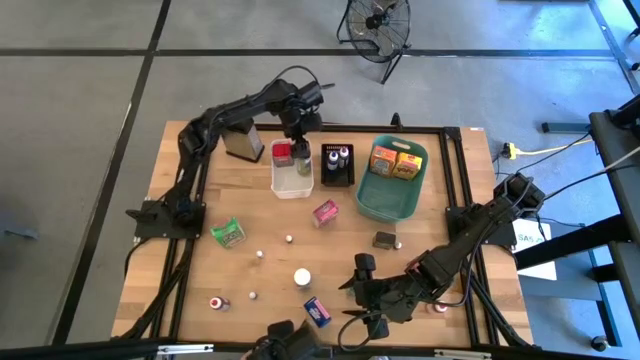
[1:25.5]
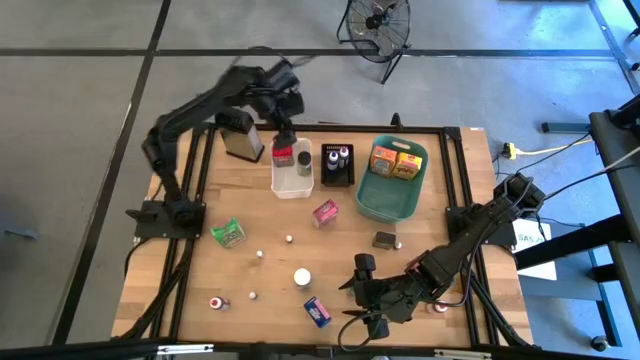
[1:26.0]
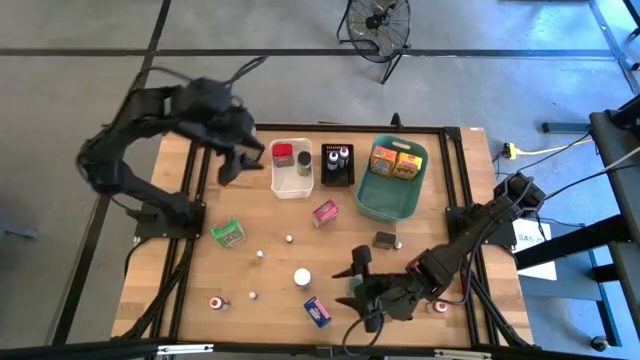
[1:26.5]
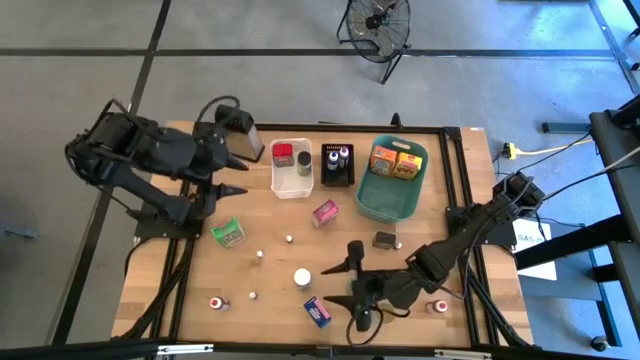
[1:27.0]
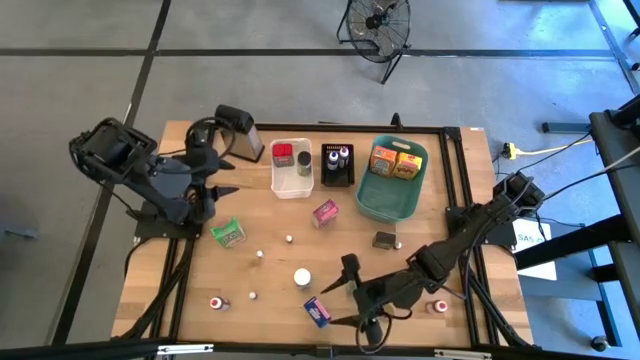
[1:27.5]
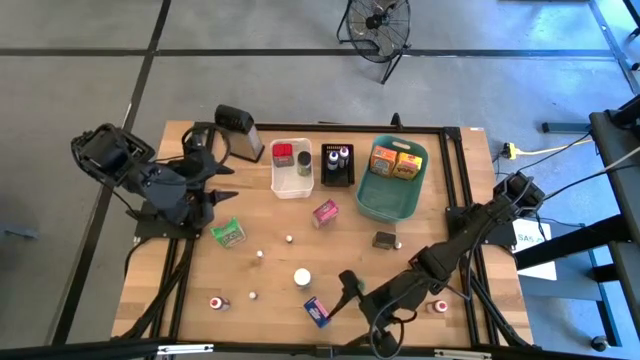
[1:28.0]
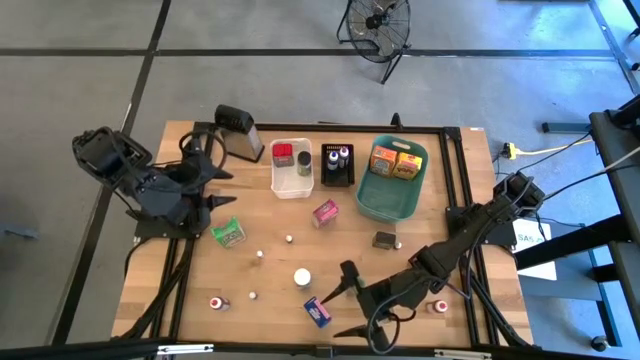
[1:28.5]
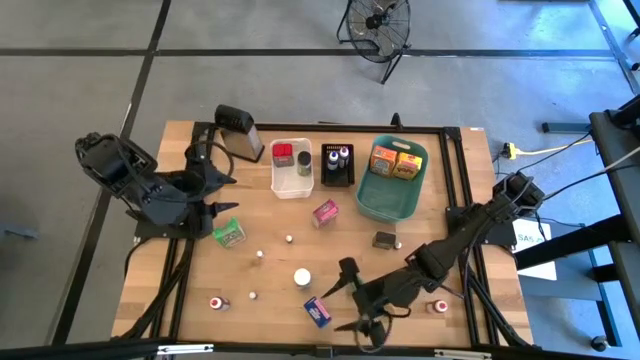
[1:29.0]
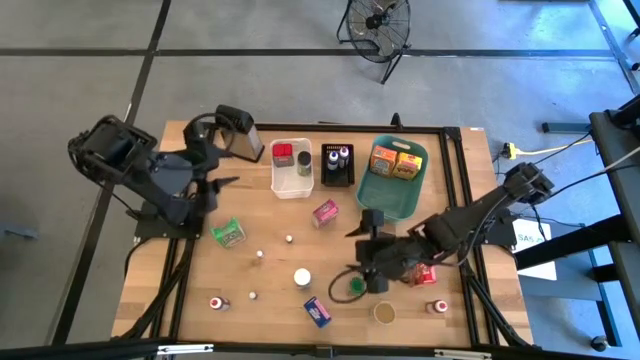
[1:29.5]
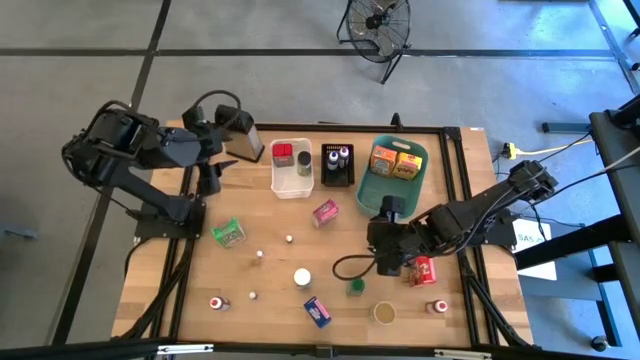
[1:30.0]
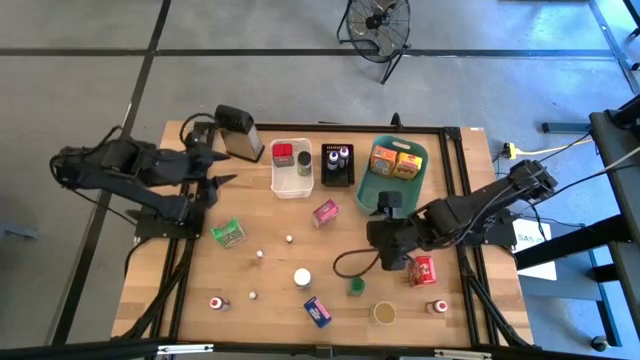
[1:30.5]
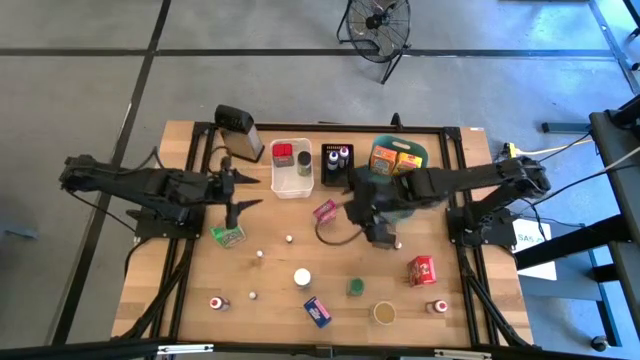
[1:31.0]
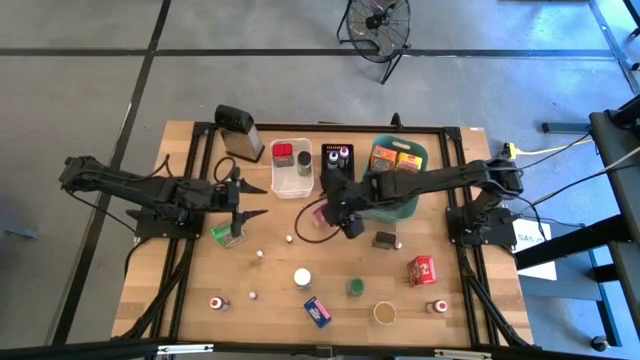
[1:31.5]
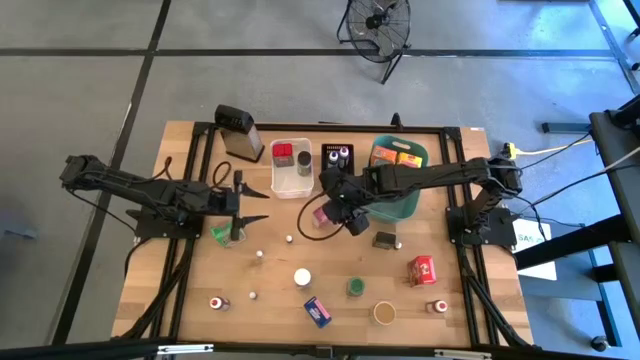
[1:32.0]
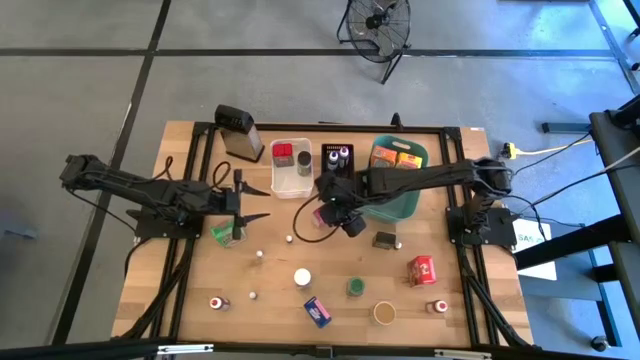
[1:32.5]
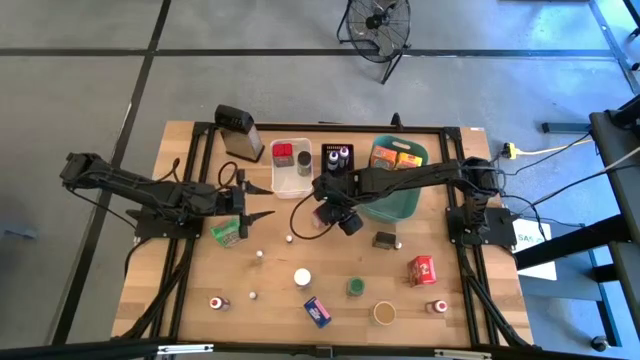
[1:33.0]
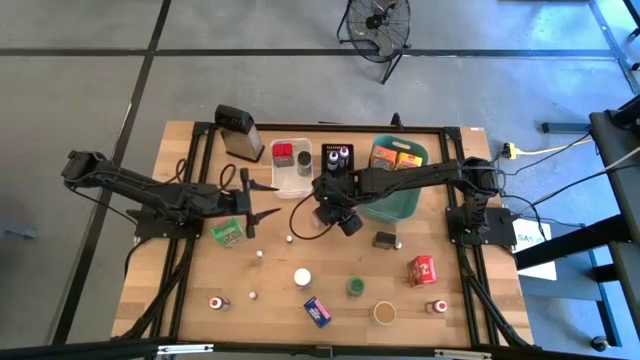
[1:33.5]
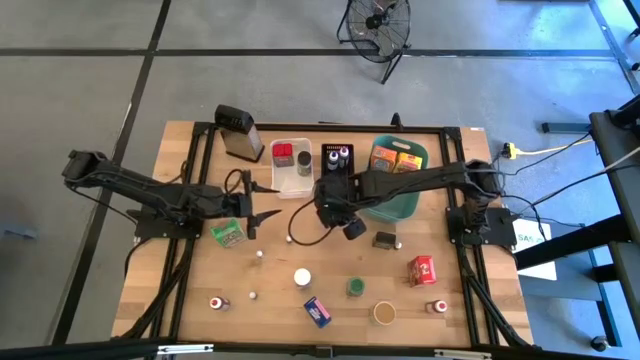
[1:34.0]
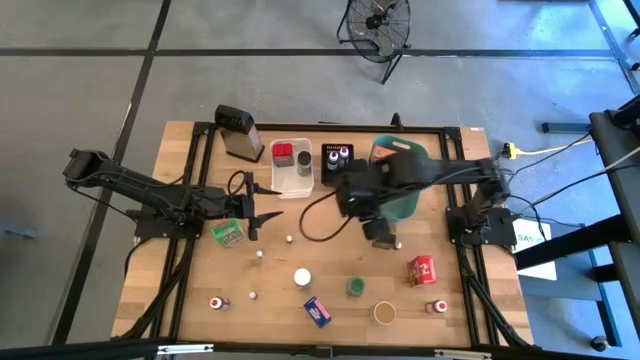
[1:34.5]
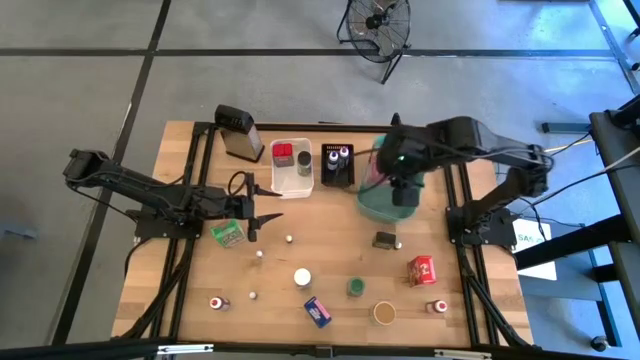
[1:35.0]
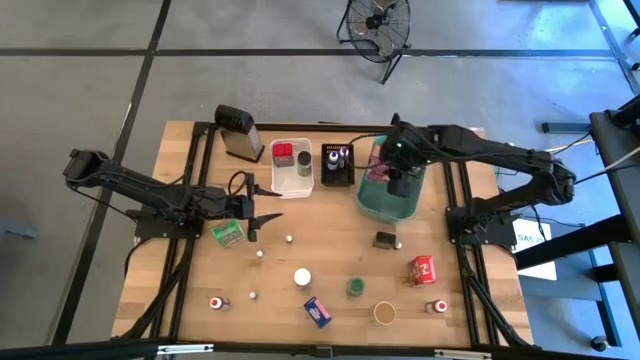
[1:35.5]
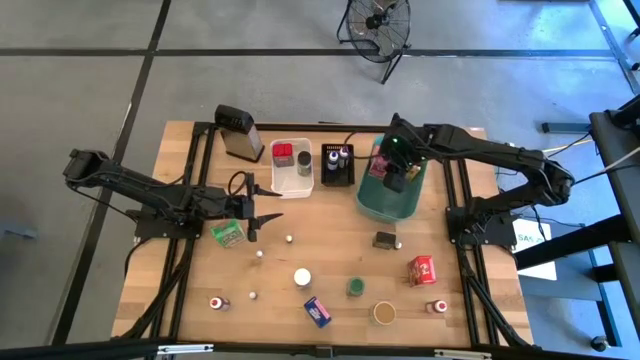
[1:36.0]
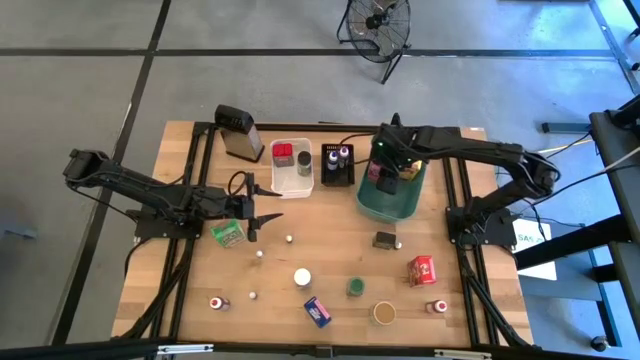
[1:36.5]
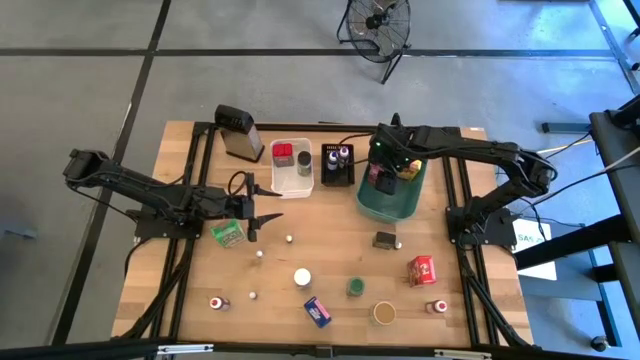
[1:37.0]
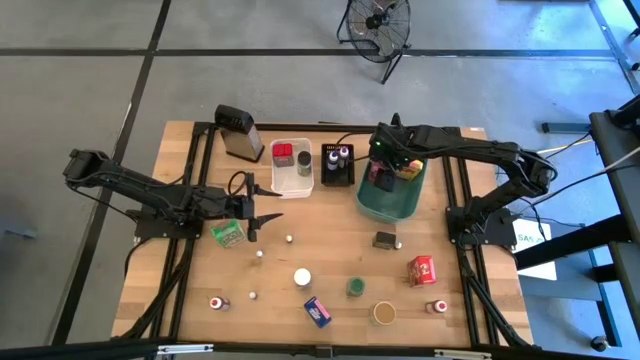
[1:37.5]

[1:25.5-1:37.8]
Task: Pick & Place Kitchen Items
Put the purple cereal box into the green bin

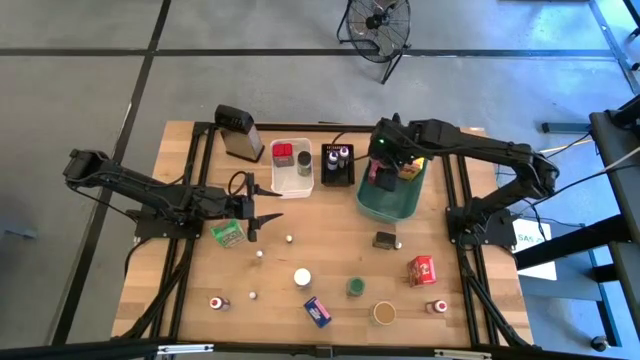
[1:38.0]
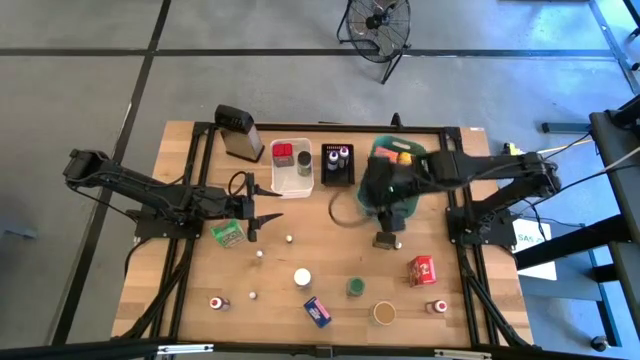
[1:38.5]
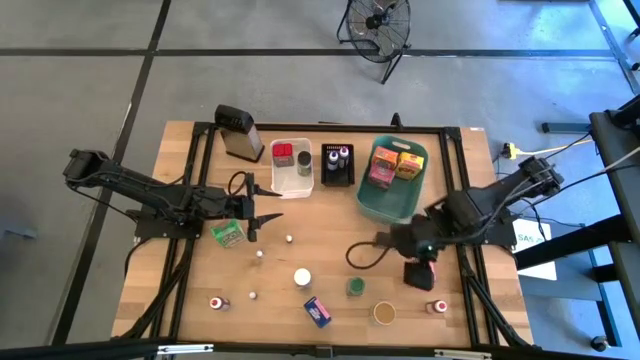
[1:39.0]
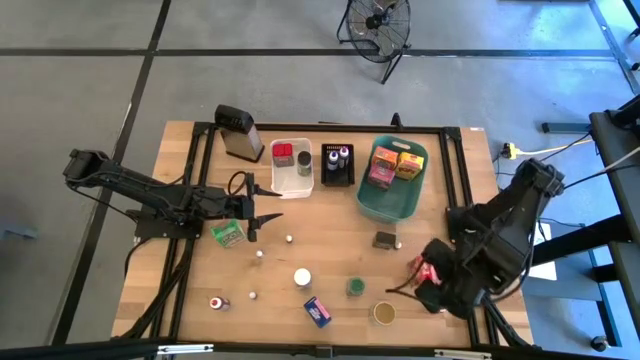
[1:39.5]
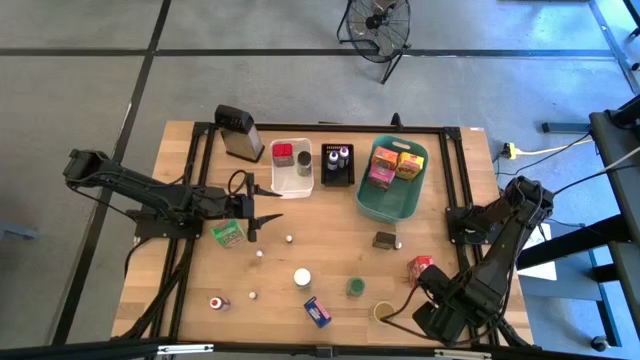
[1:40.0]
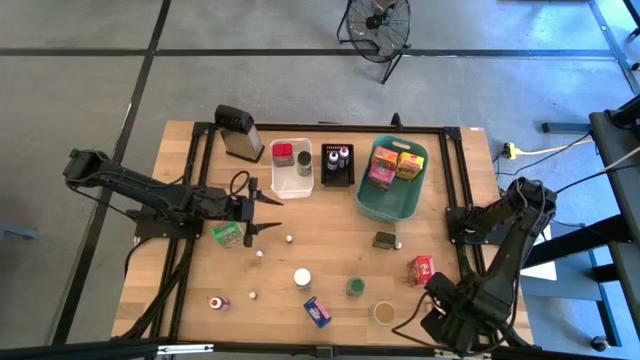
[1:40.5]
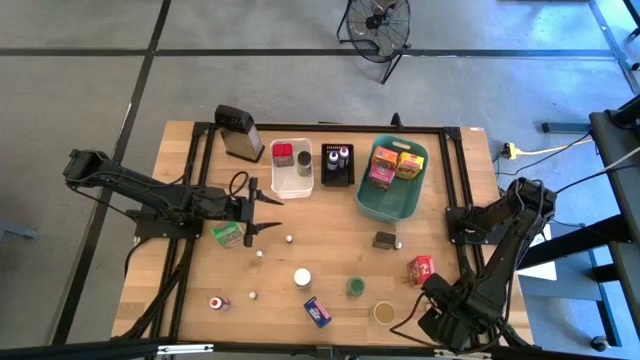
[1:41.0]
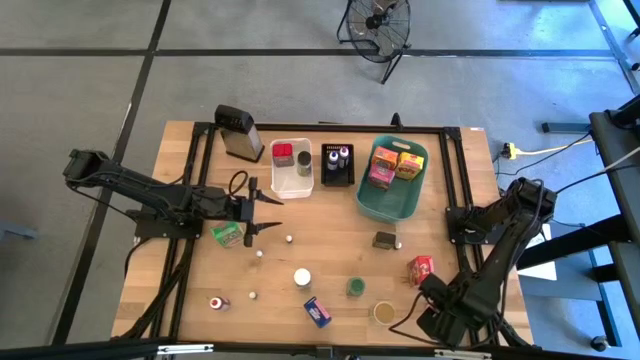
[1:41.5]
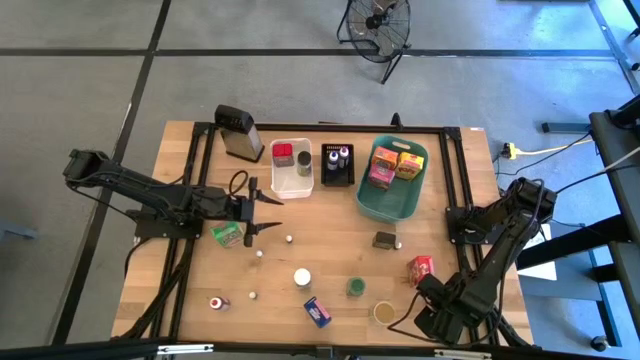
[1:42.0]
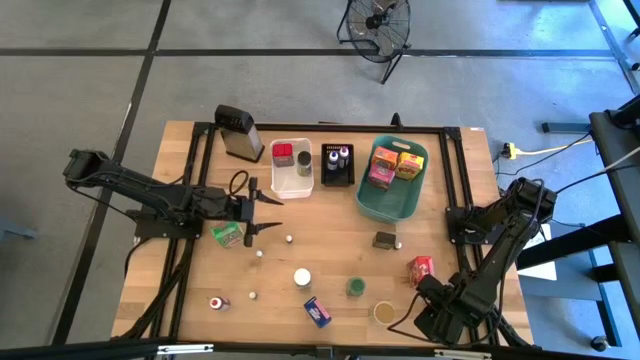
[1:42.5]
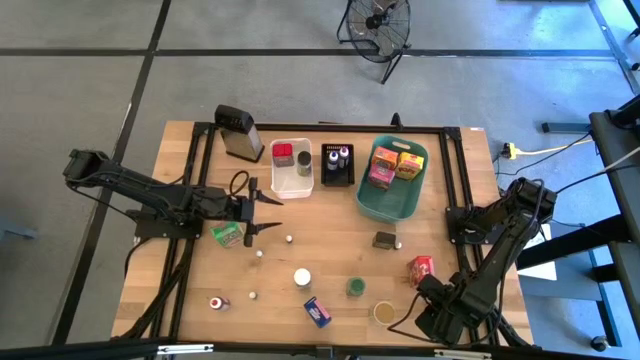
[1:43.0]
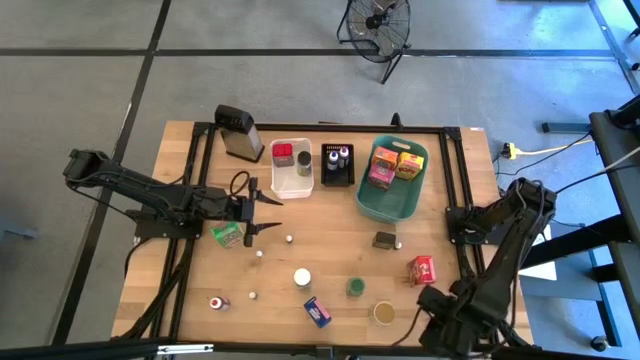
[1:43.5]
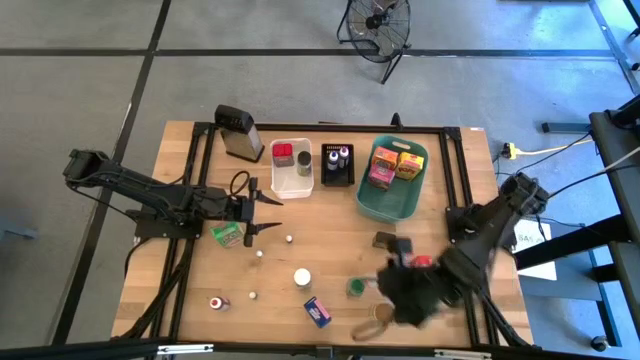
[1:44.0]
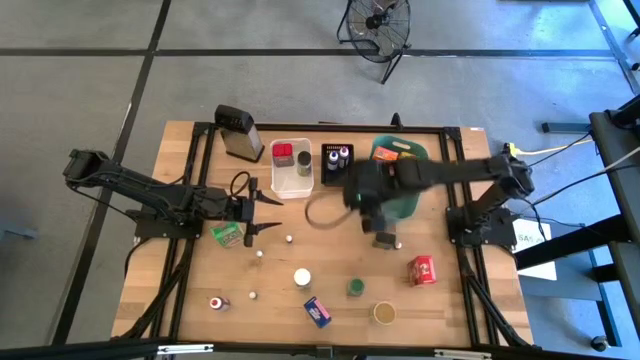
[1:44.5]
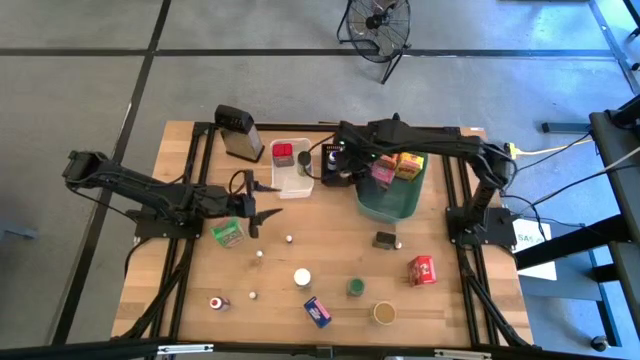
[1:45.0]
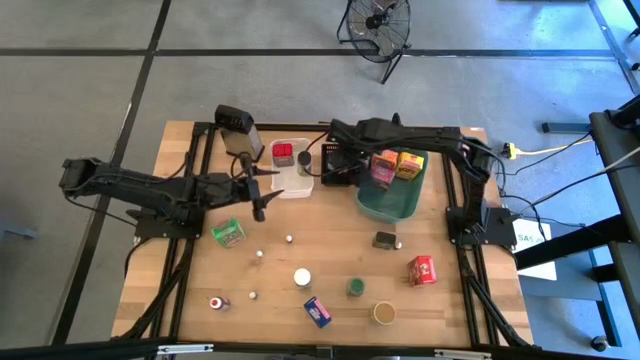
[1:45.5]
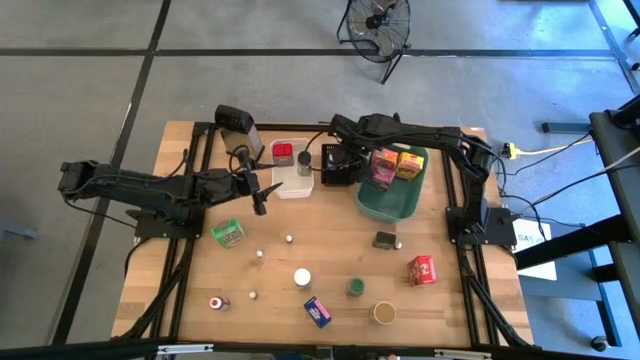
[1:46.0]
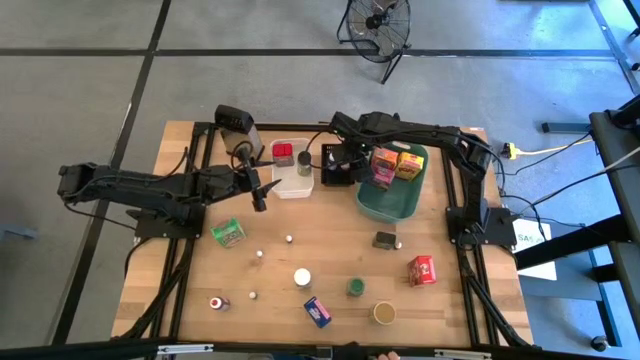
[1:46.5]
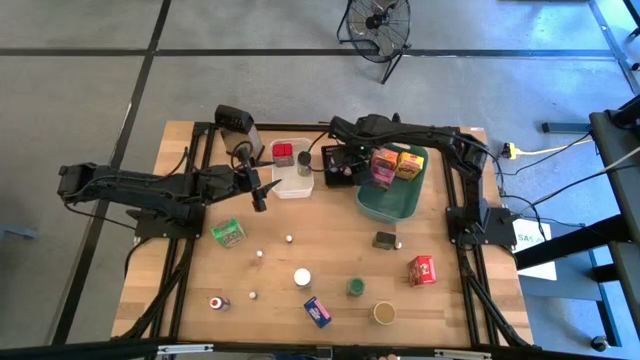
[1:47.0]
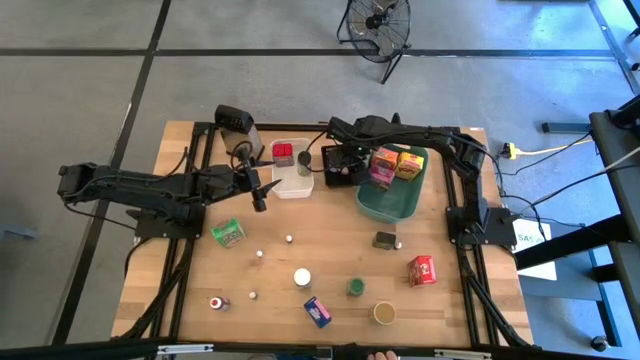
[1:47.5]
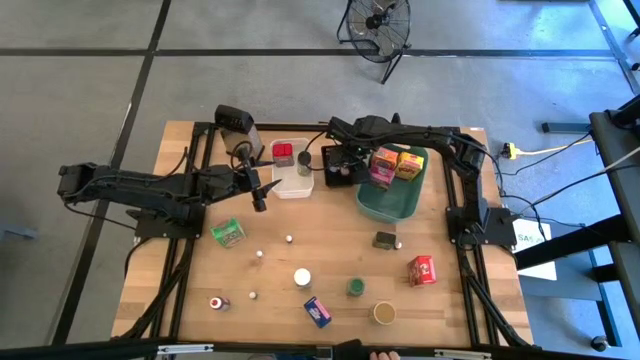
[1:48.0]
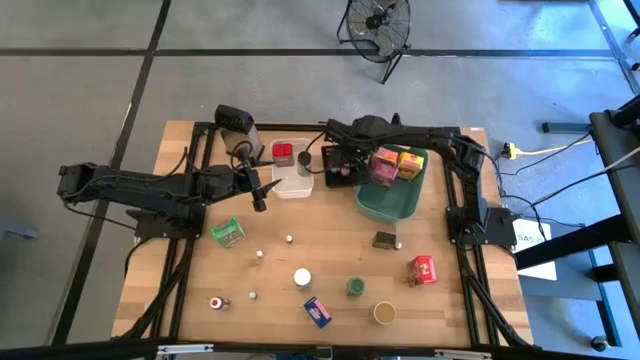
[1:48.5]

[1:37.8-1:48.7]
Put the large pink food coloring bottle into the black bin
